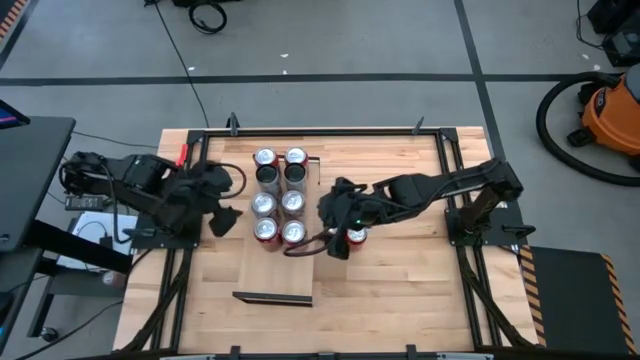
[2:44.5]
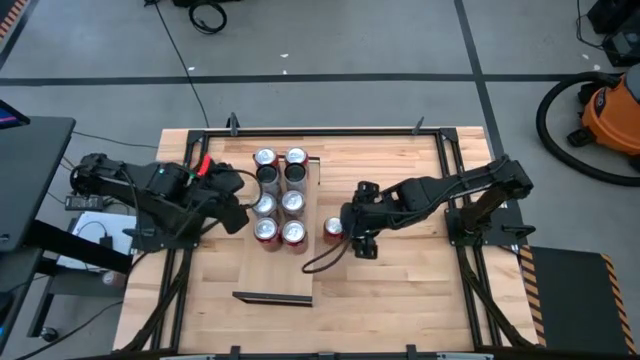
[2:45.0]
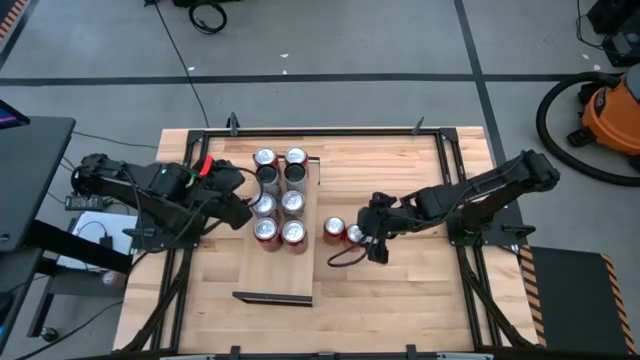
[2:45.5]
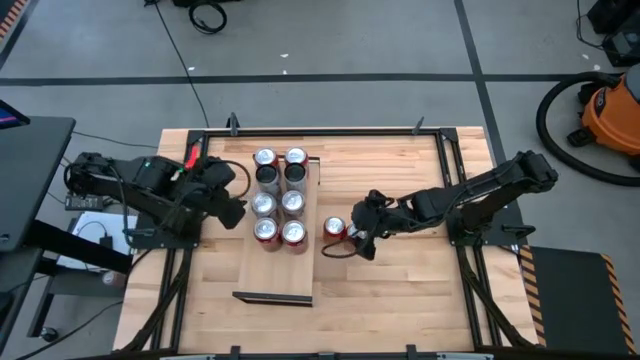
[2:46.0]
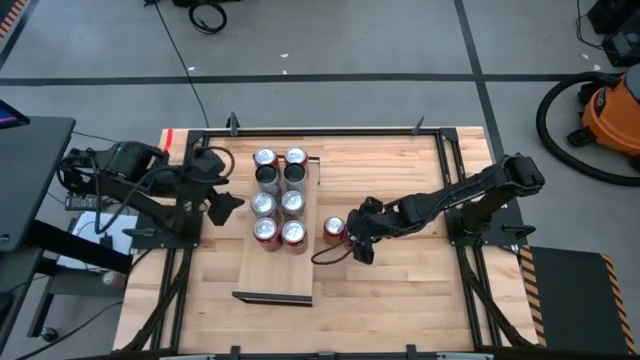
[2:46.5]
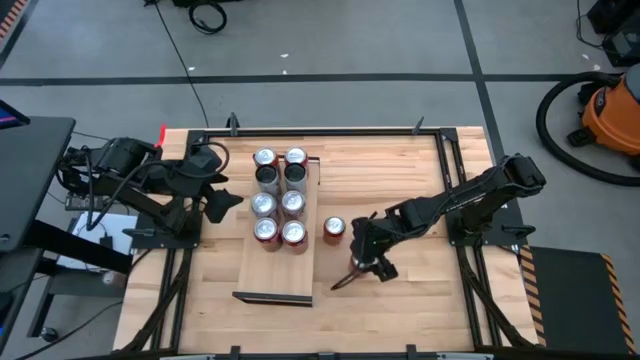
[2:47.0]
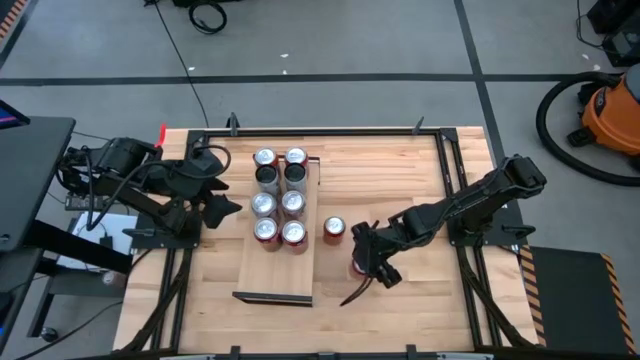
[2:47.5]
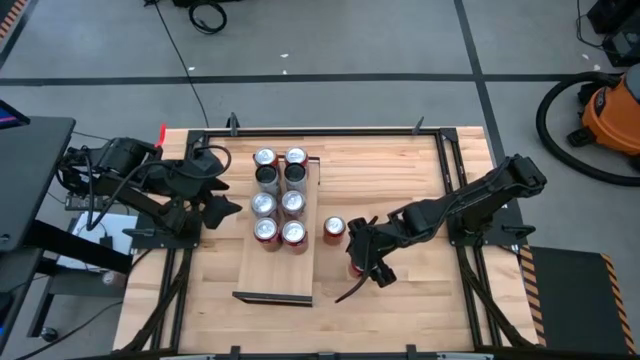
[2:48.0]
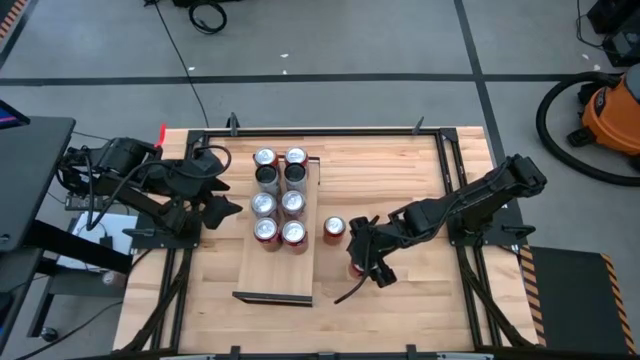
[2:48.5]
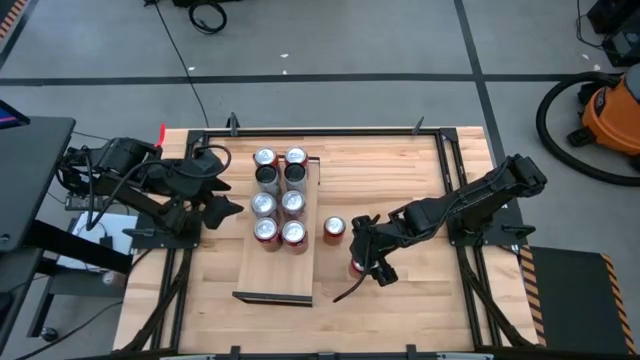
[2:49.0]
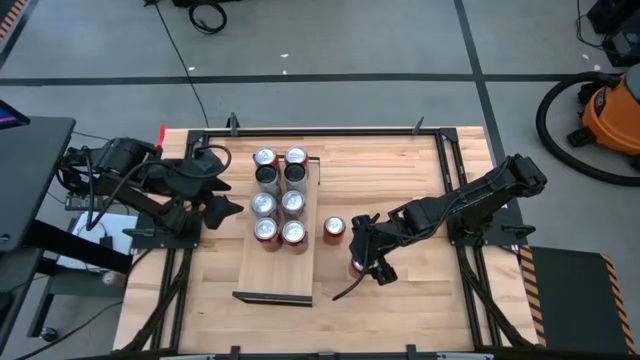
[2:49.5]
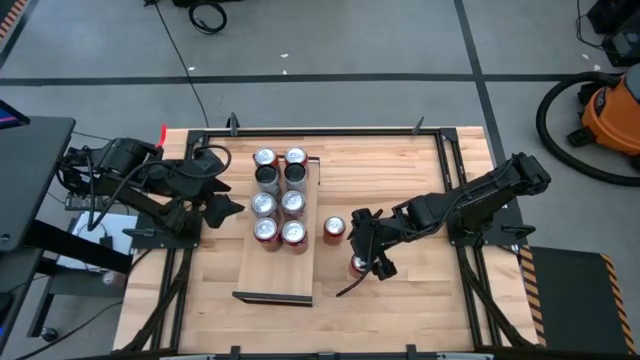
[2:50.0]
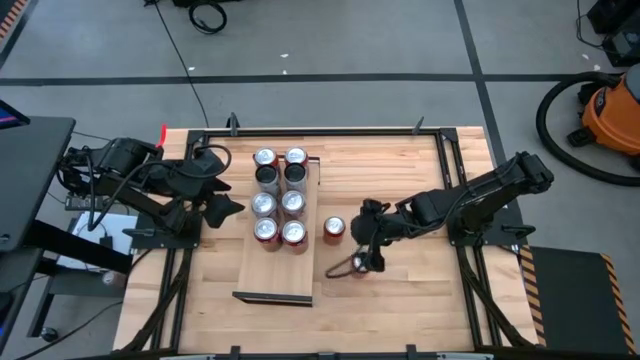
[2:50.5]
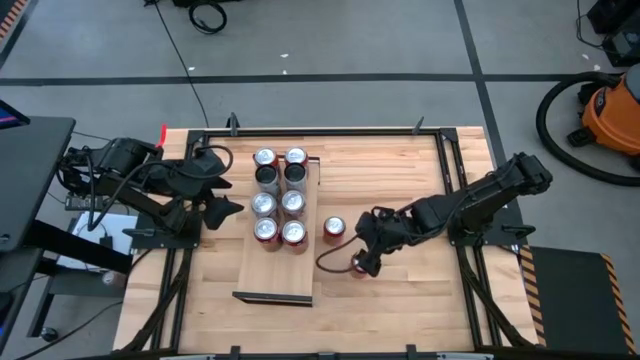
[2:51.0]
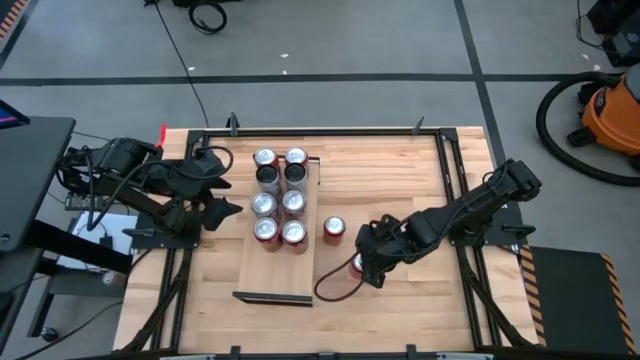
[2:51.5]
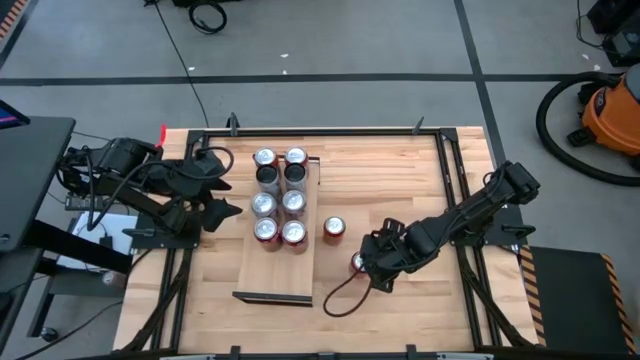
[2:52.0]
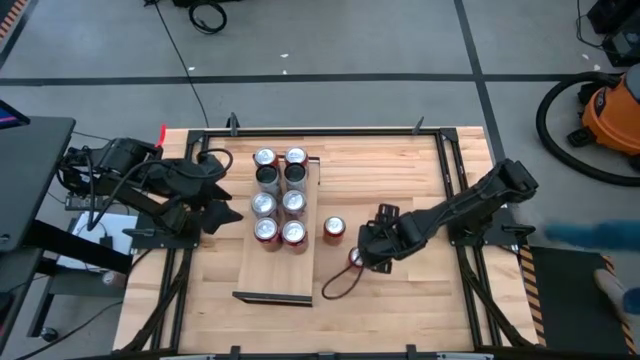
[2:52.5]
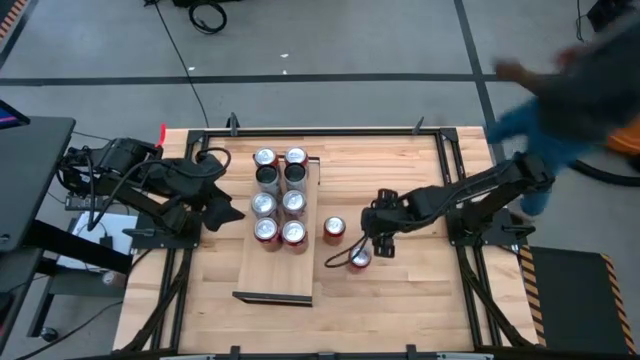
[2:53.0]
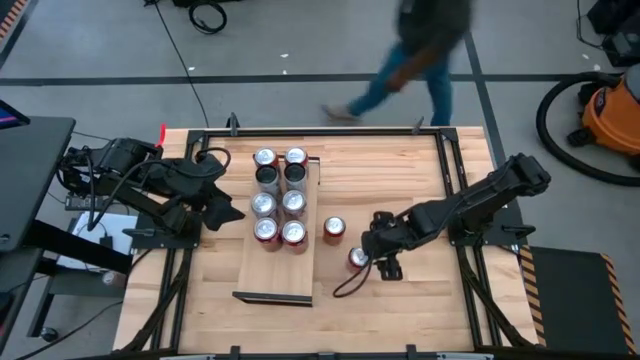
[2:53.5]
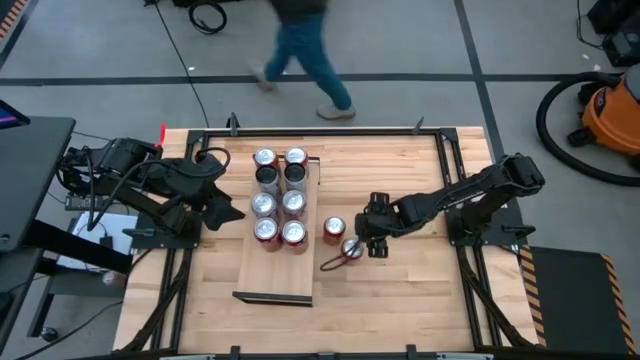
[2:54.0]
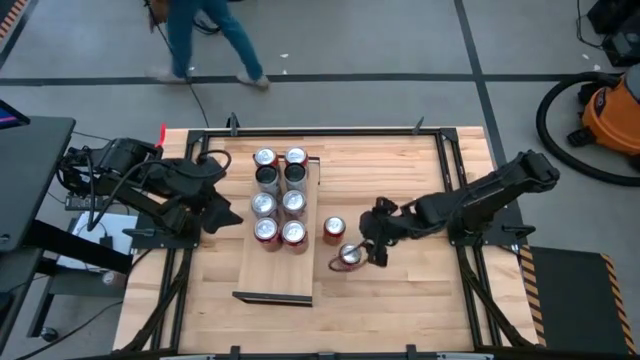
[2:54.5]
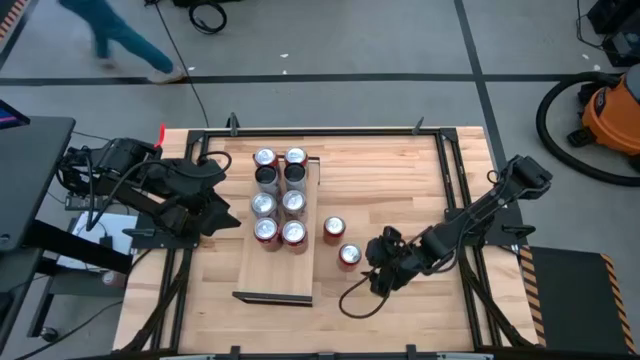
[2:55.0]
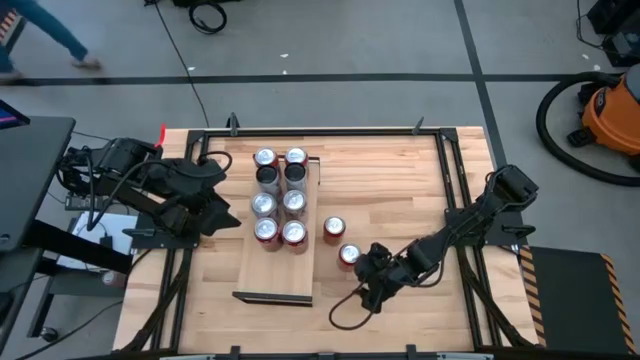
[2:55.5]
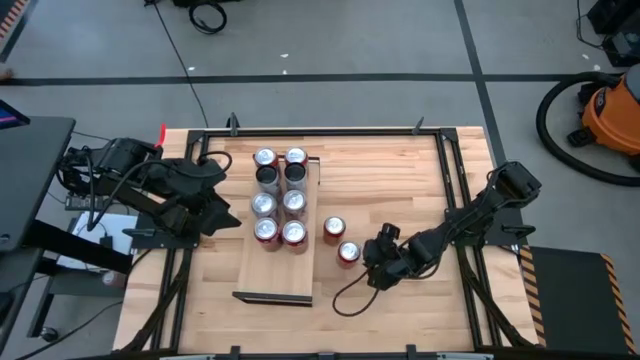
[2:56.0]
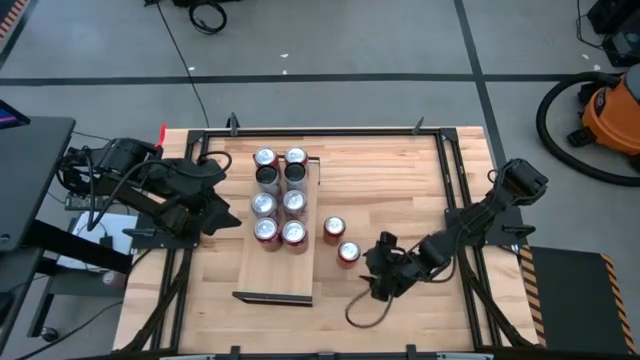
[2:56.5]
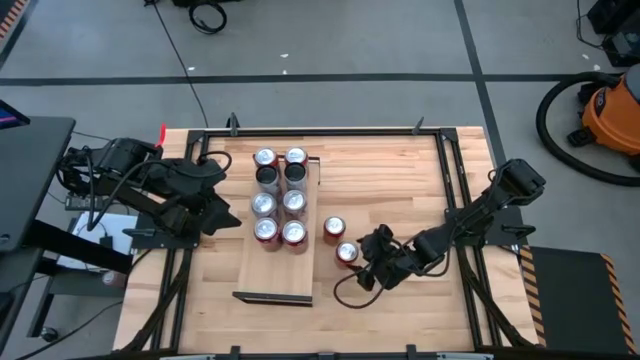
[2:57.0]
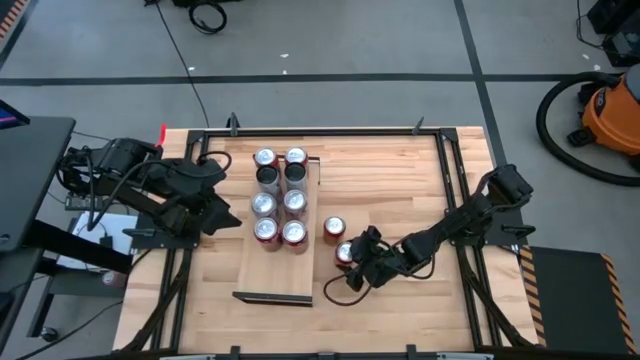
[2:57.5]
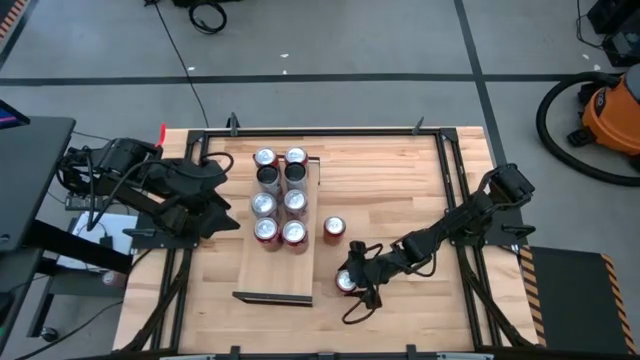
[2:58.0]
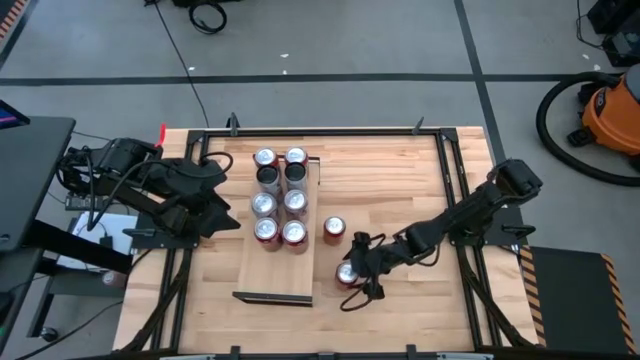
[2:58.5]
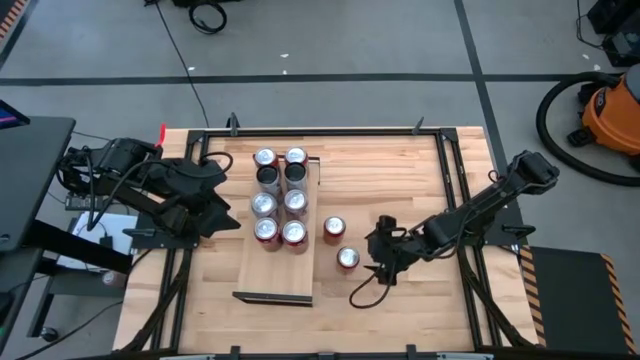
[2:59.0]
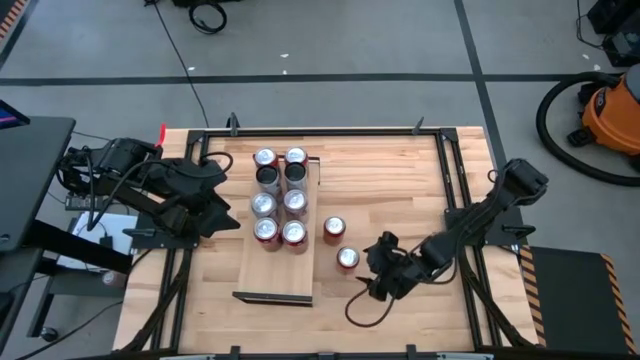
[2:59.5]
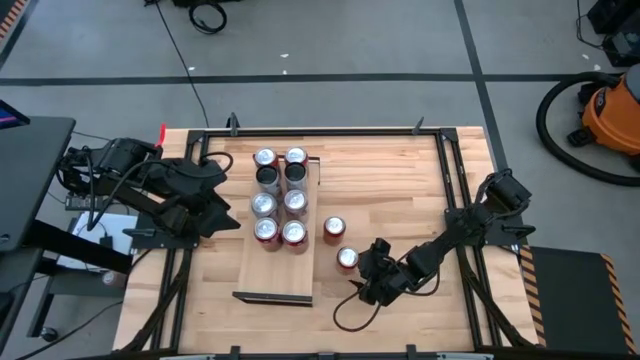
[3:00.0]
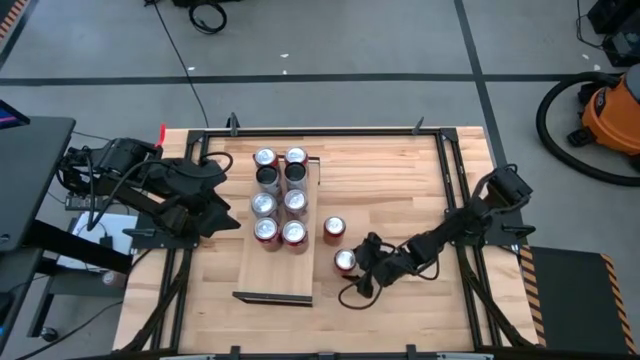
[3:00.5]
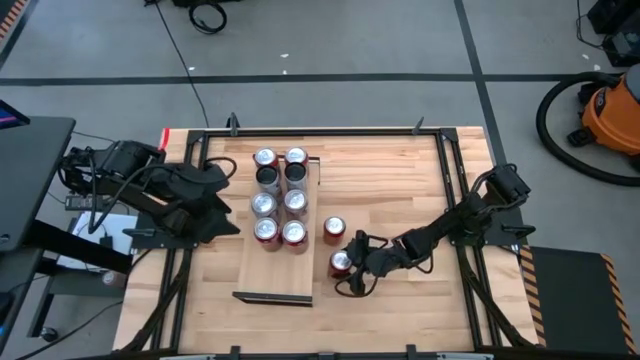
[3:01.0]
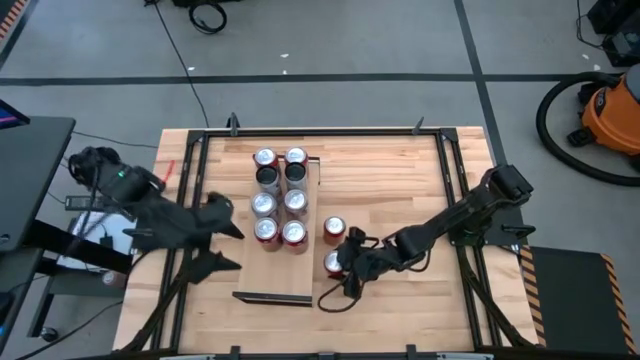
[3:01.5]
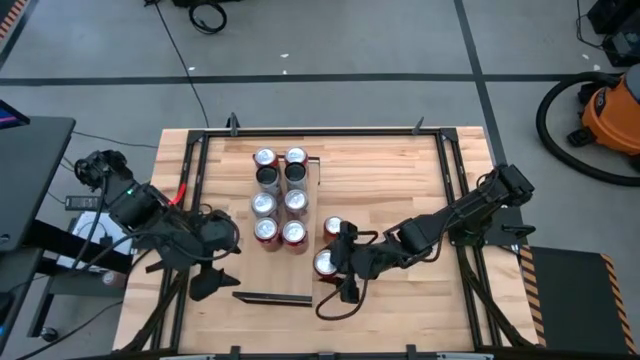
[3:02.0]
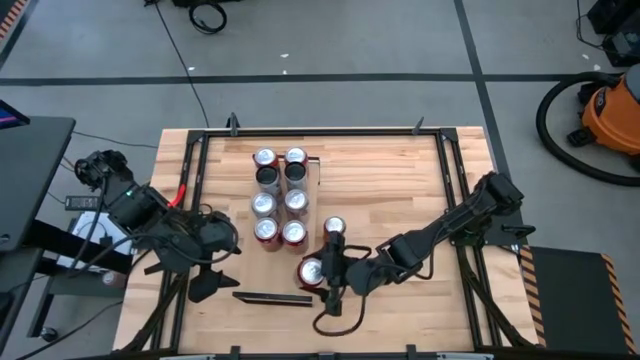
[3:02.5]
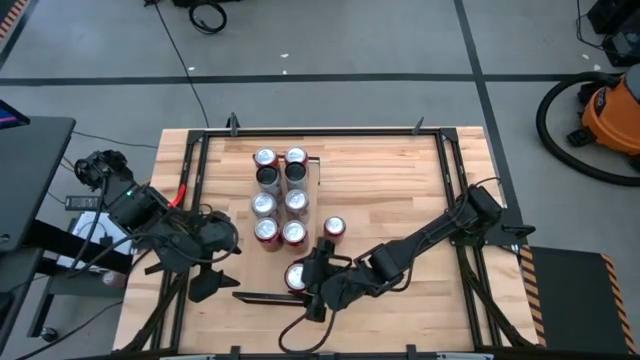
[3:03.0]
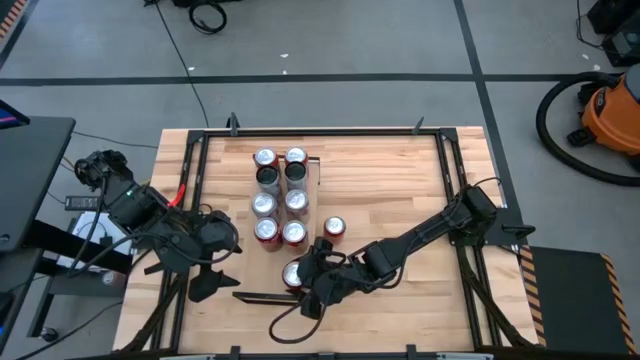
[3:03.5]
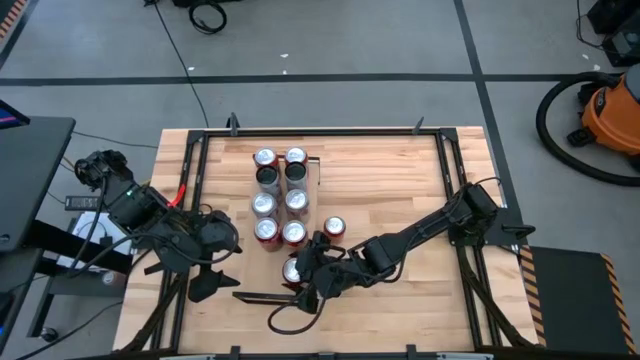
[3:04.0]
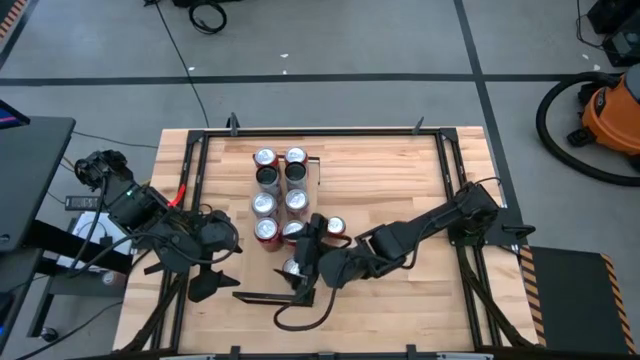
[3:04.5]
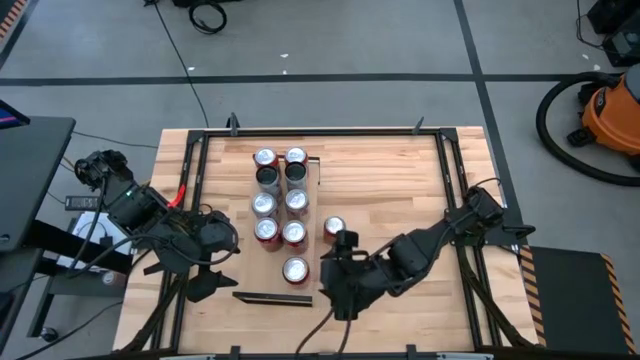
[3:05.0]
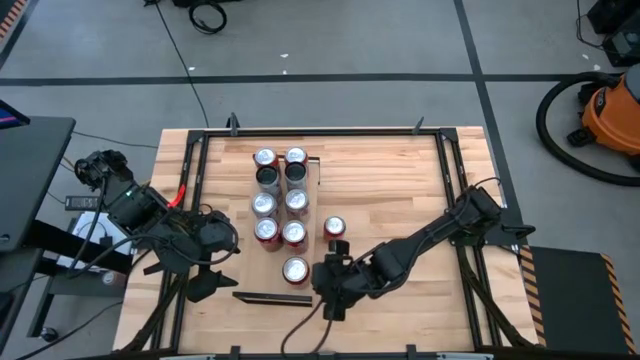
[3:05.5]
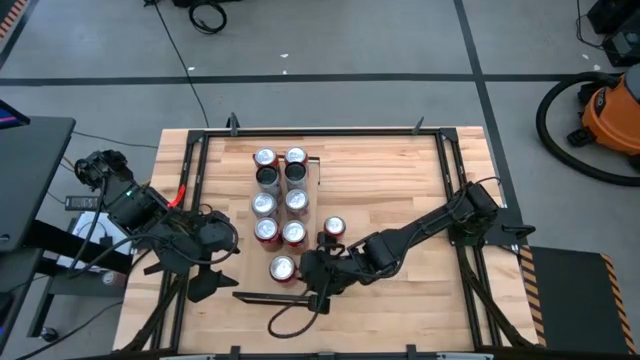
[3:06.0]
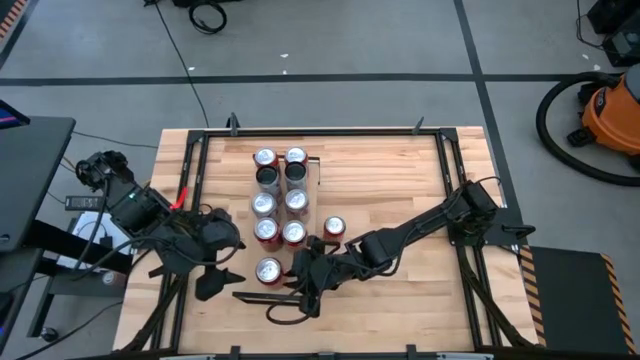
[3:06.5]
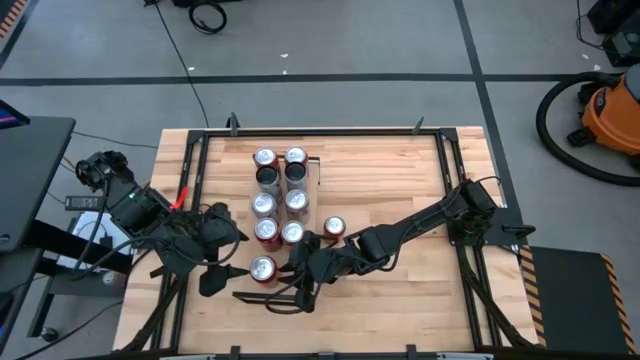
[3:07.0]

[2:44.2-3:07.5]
Task: Place canned beverage on shelf
Put the bottom right red and black soda can on the shelf
